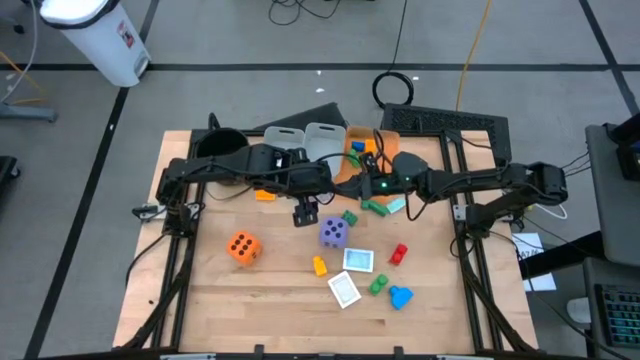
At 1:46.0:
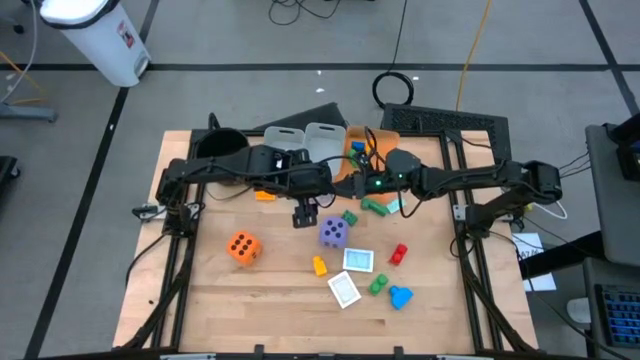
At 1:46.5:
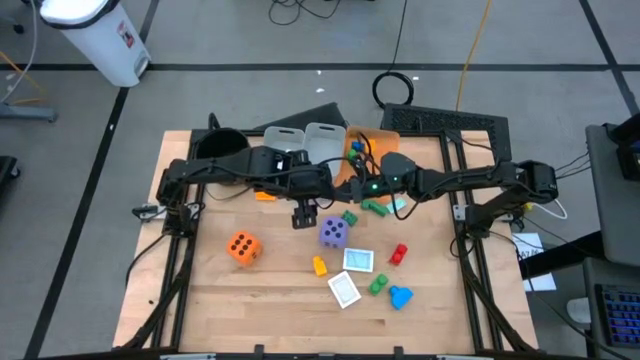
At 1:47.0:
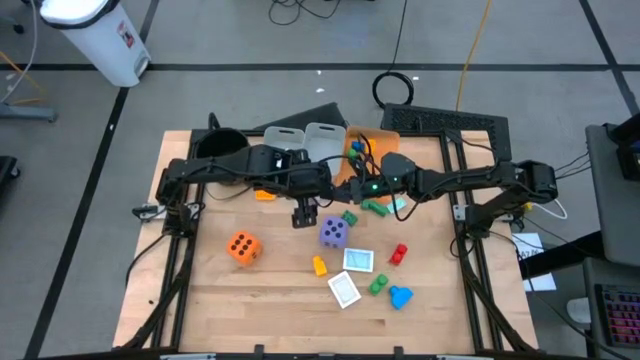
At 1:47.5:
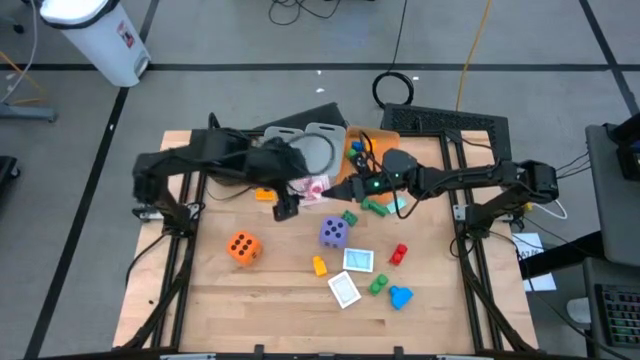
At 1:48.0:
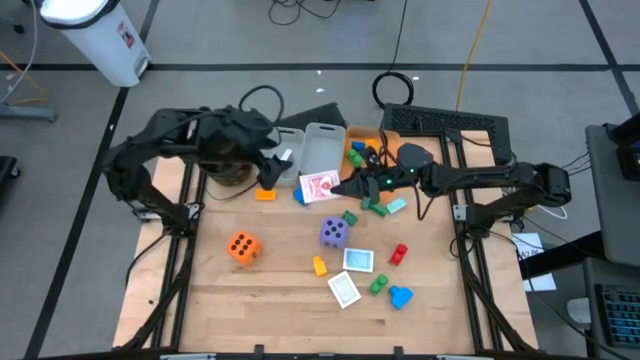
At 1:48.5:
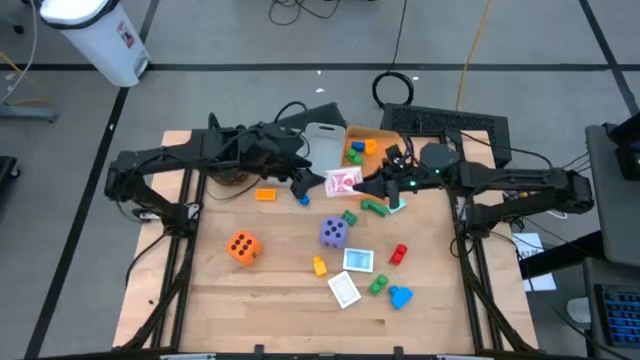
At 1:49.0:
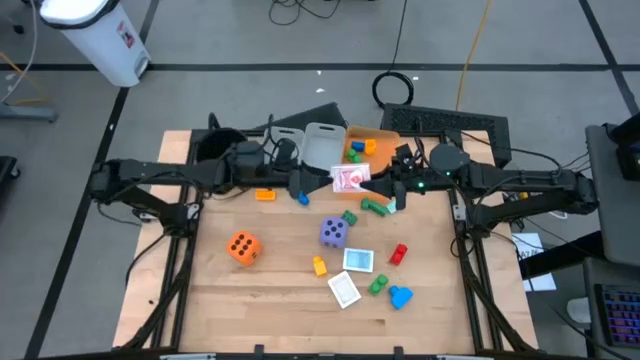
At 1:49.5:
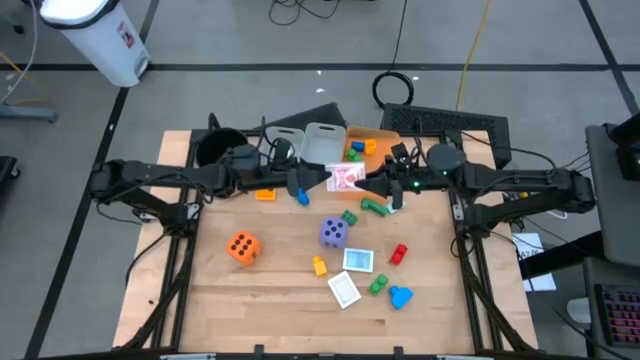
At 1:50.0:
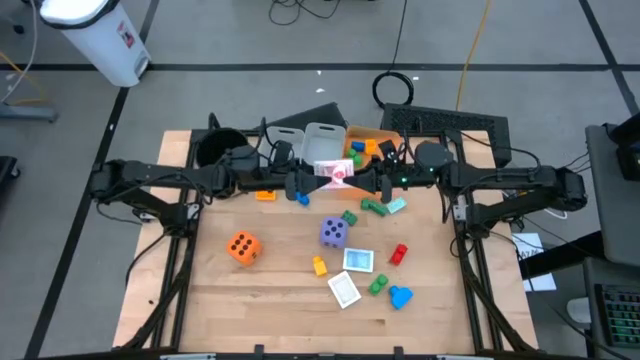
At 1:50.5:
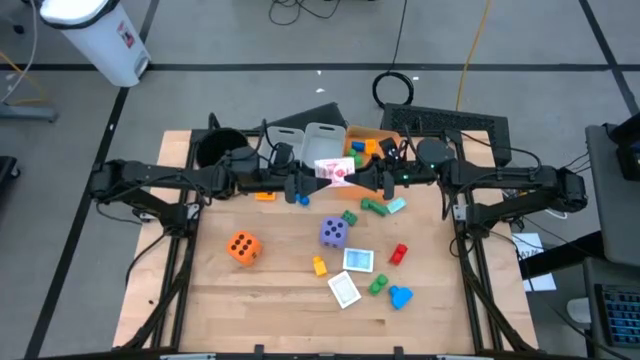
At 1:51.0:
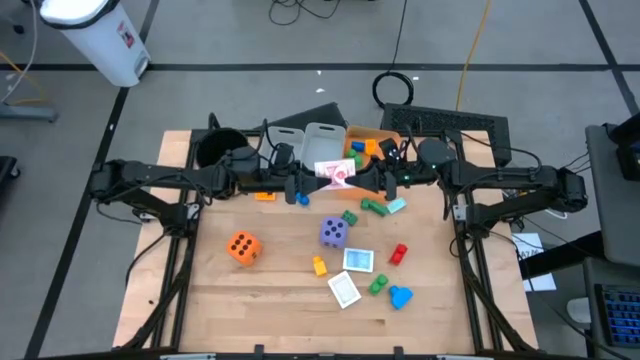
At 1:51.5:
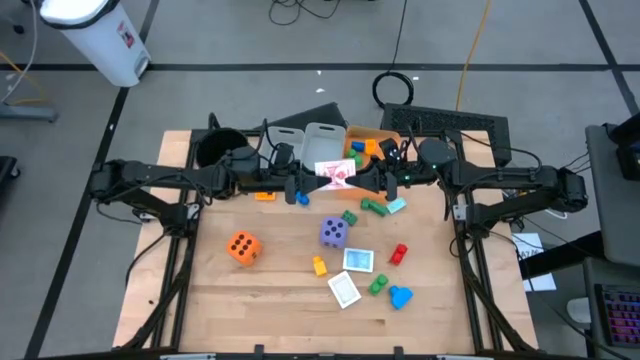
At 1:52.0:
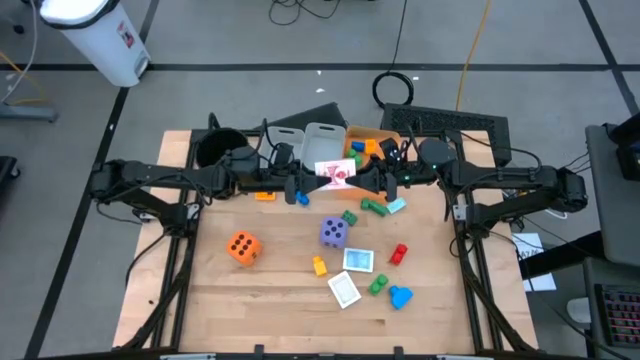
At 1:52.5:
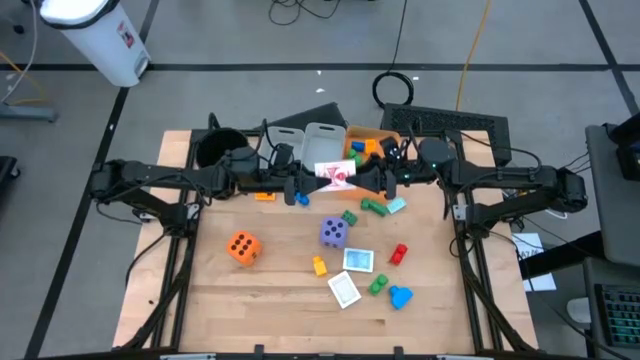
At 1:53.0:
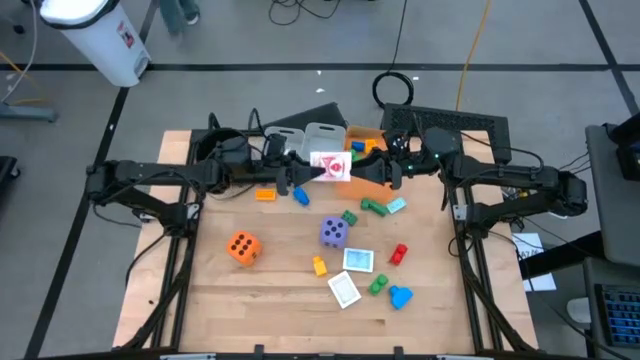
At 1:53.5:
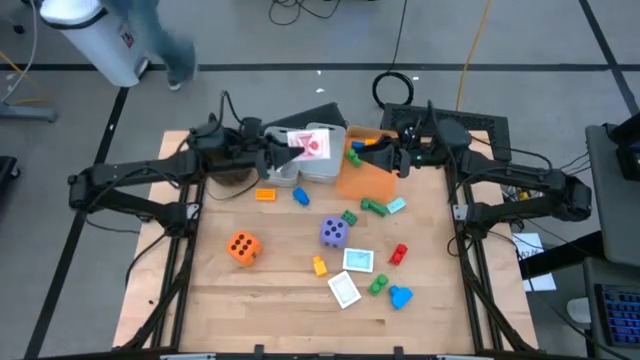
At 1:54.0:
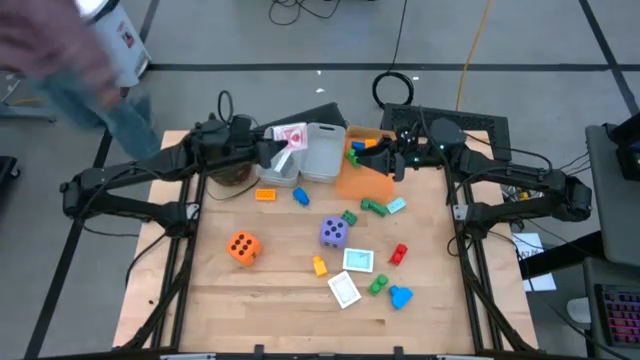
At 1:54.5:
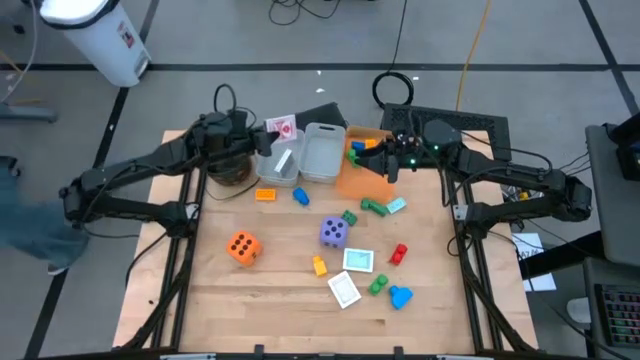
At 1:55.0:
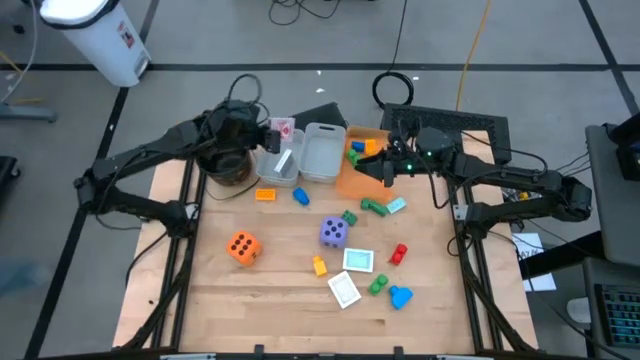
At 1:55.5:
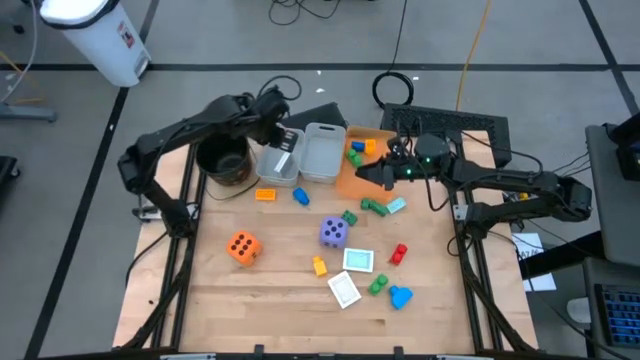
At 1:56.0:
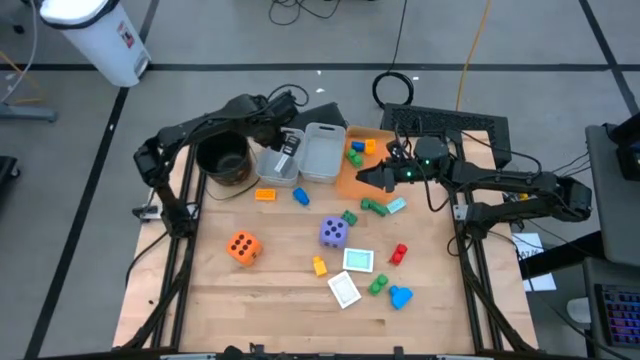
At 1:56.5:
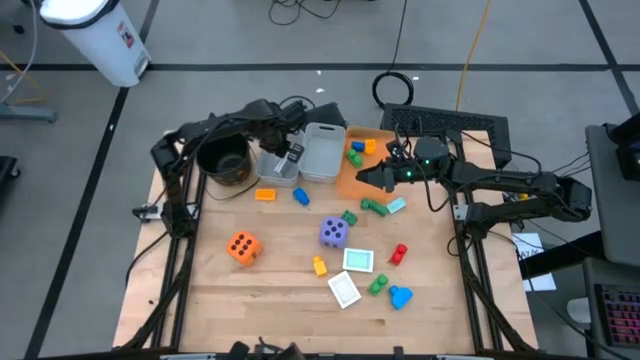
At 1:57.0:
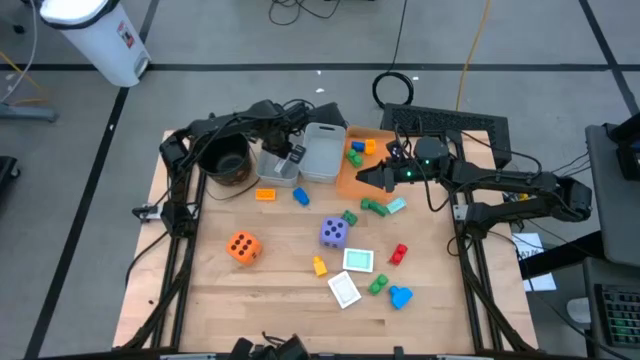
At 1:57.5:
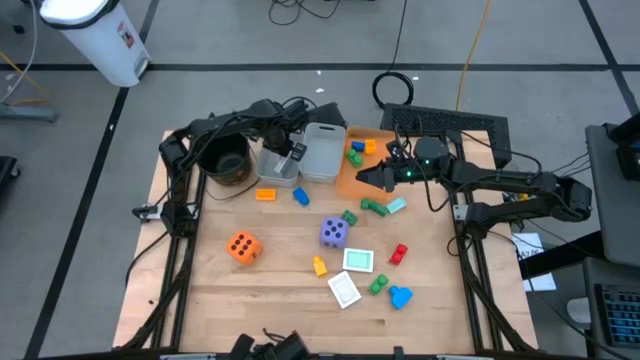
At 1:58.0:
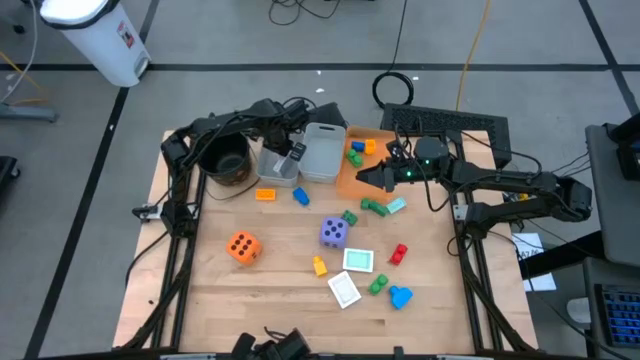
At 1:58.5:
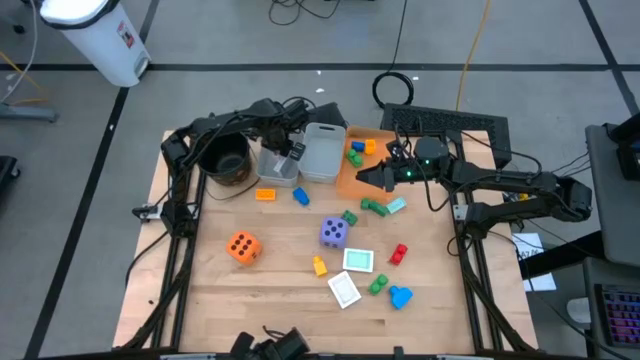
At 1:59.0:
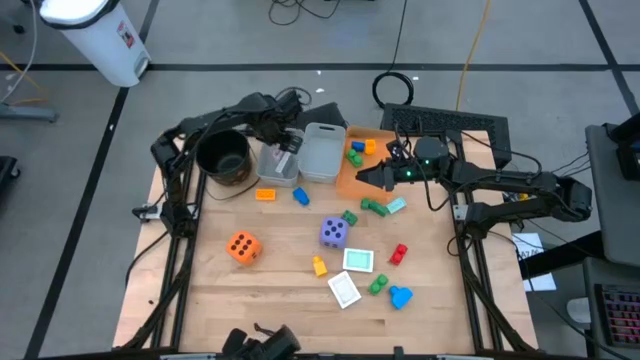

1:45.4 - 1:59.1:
Task: Pick & Place Toys
Put the red deck of cards into the left gray bin
